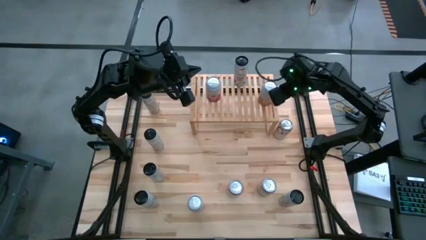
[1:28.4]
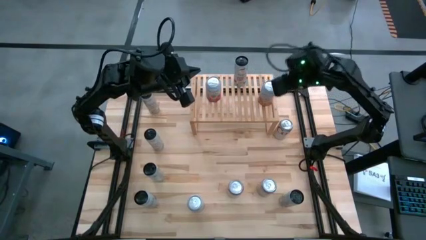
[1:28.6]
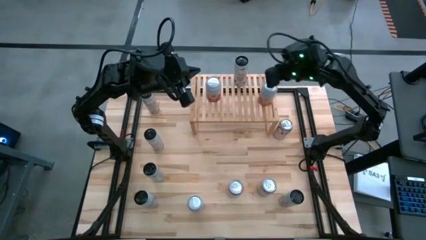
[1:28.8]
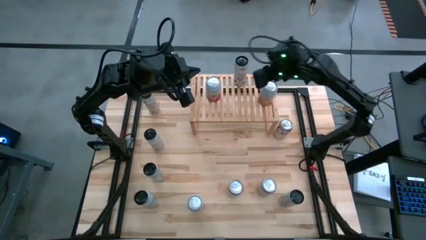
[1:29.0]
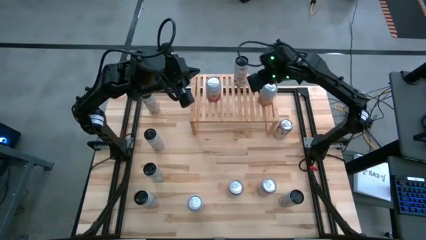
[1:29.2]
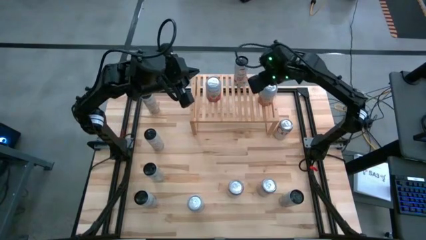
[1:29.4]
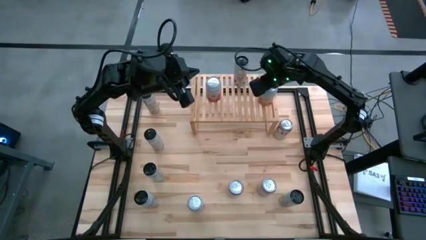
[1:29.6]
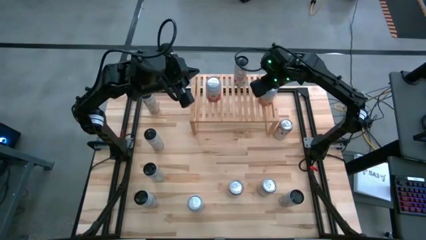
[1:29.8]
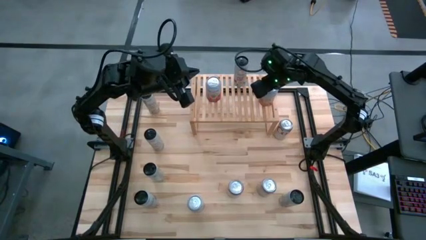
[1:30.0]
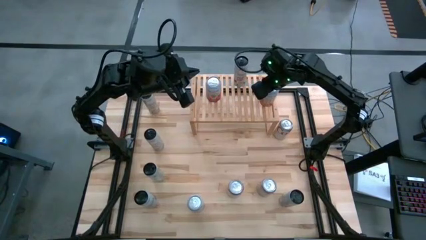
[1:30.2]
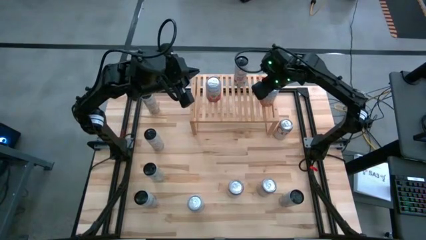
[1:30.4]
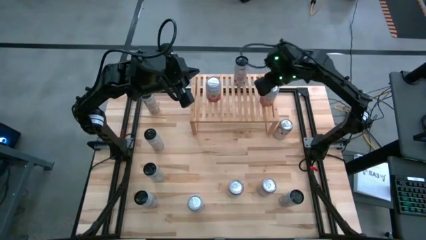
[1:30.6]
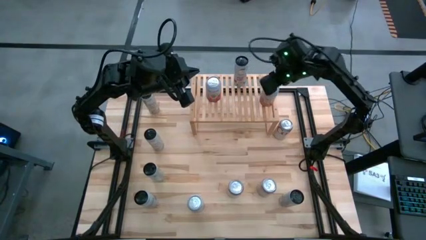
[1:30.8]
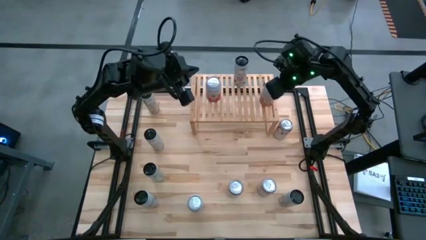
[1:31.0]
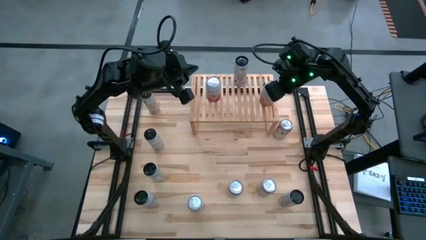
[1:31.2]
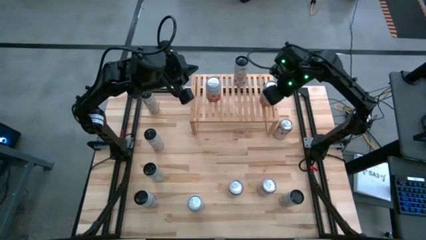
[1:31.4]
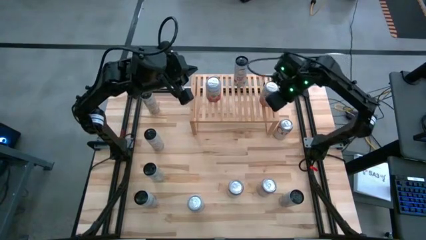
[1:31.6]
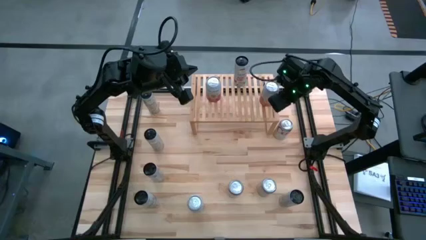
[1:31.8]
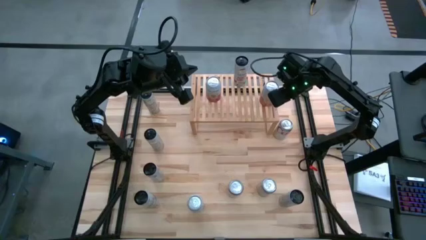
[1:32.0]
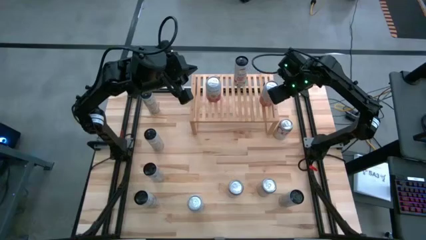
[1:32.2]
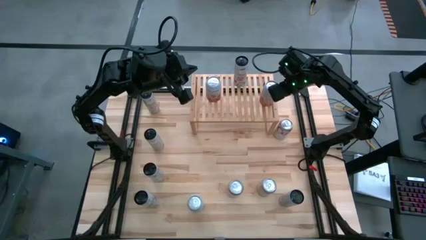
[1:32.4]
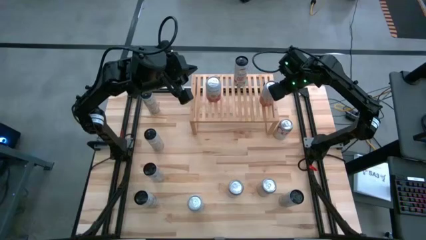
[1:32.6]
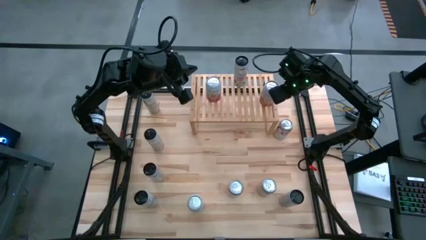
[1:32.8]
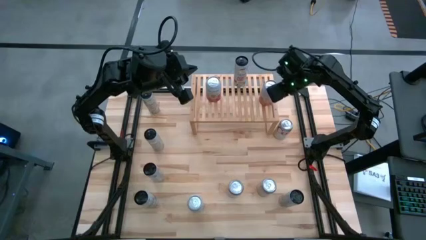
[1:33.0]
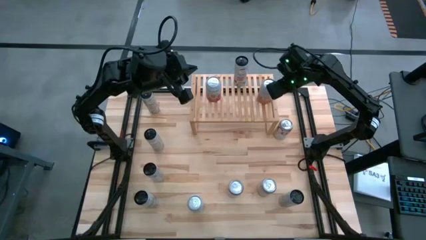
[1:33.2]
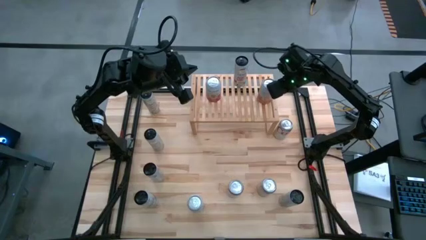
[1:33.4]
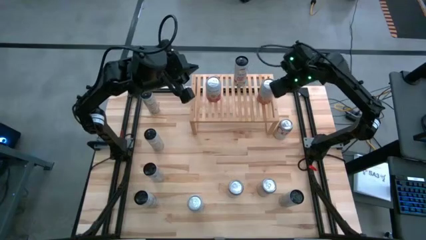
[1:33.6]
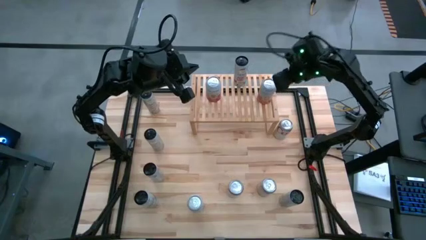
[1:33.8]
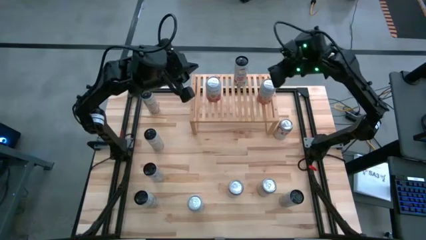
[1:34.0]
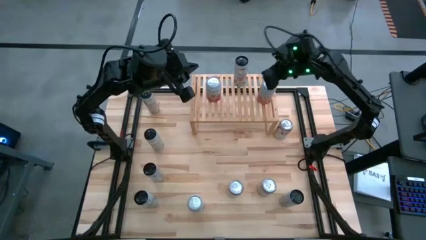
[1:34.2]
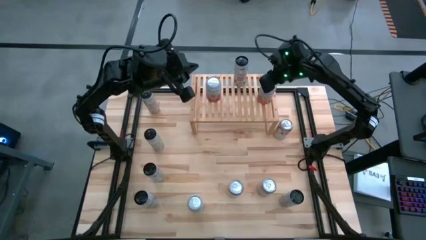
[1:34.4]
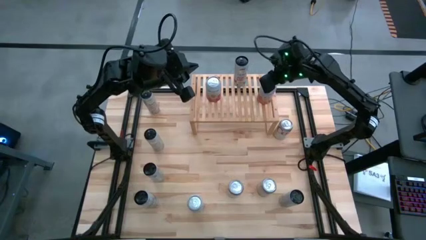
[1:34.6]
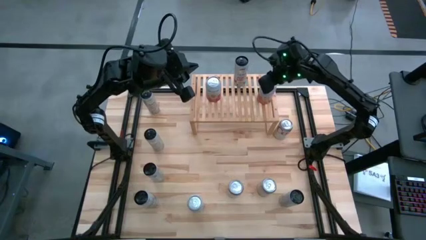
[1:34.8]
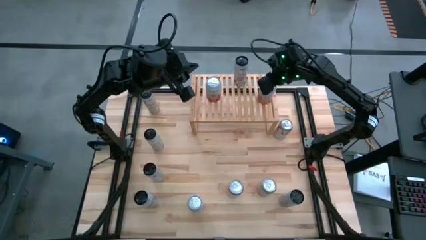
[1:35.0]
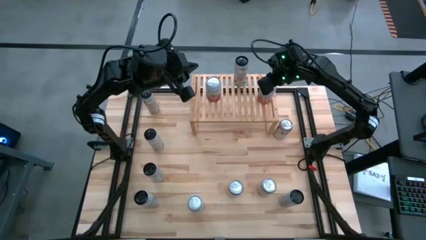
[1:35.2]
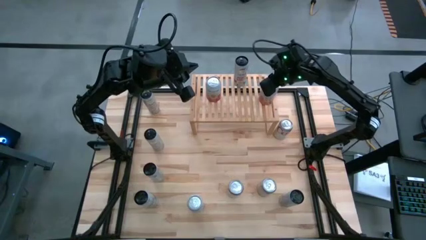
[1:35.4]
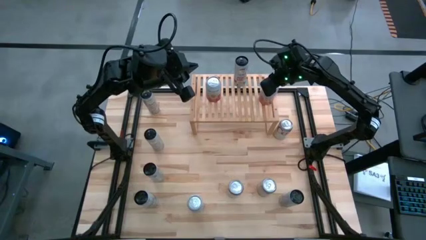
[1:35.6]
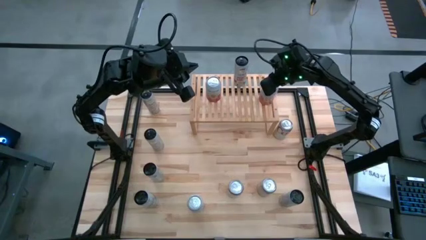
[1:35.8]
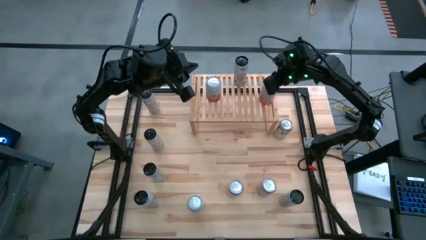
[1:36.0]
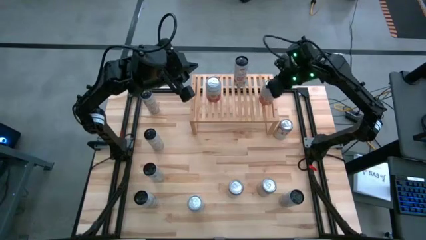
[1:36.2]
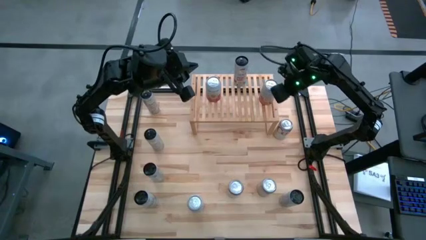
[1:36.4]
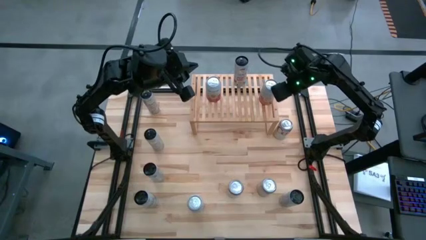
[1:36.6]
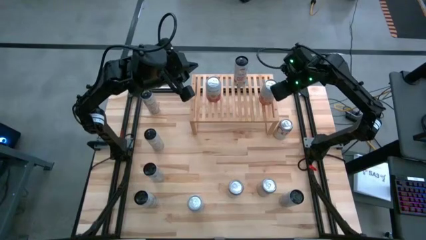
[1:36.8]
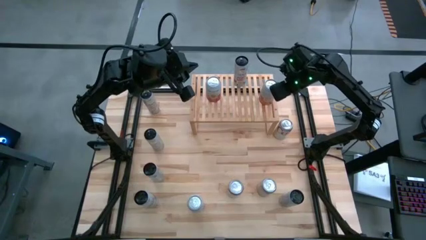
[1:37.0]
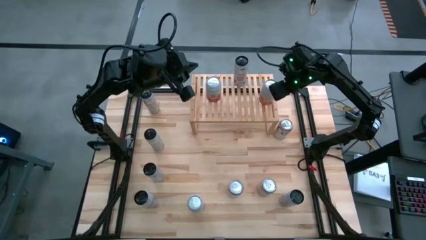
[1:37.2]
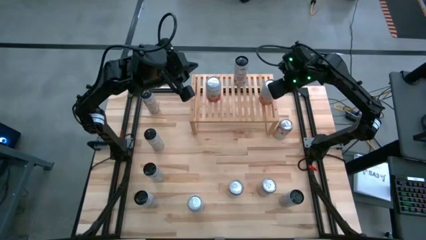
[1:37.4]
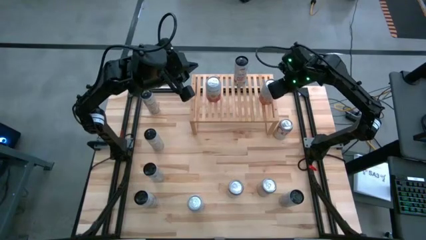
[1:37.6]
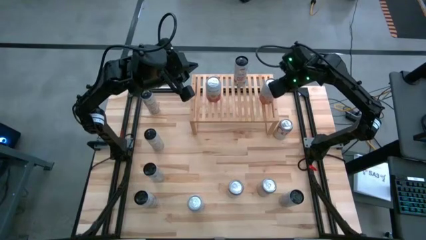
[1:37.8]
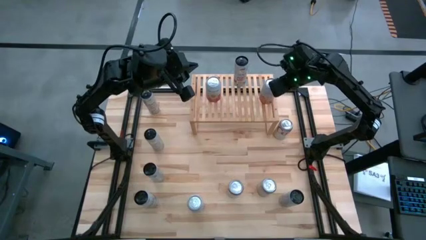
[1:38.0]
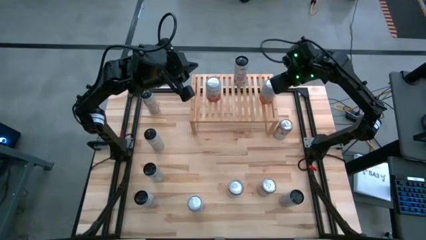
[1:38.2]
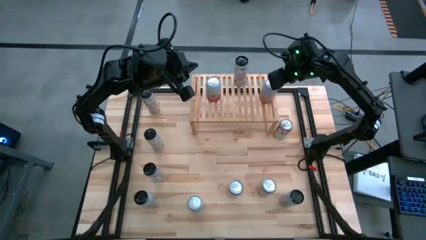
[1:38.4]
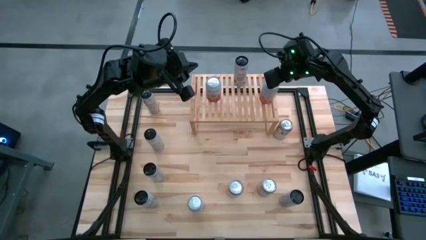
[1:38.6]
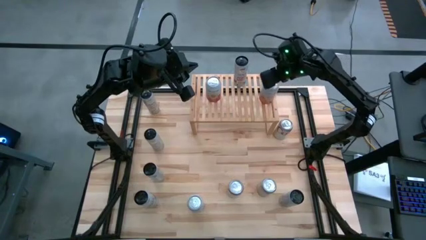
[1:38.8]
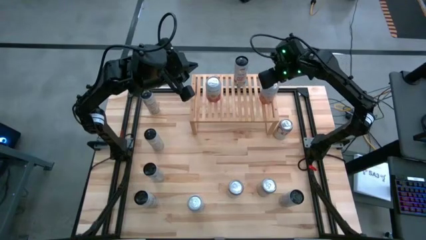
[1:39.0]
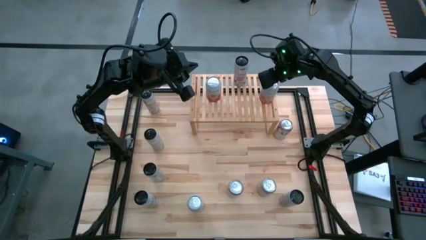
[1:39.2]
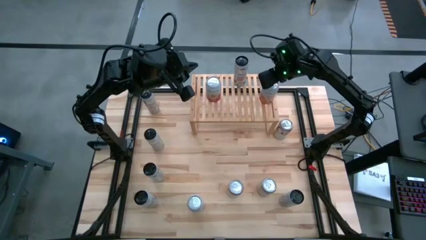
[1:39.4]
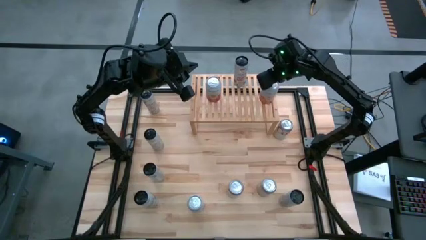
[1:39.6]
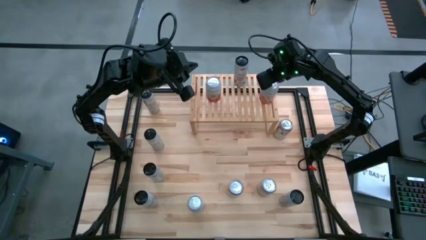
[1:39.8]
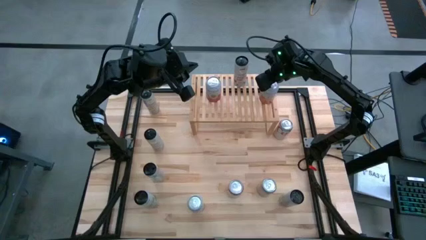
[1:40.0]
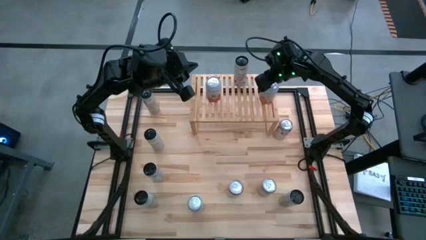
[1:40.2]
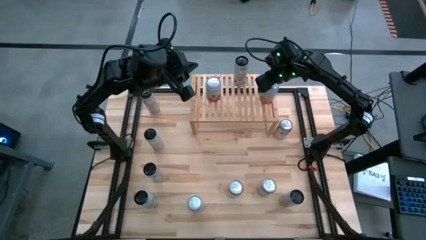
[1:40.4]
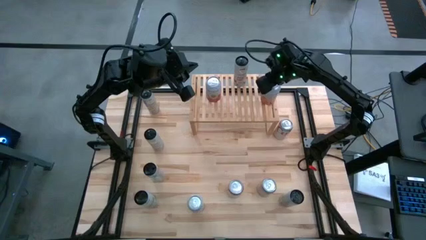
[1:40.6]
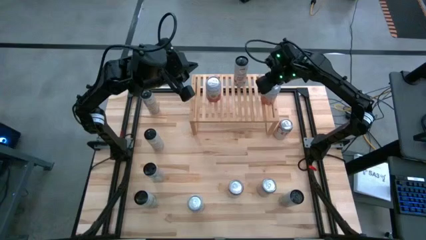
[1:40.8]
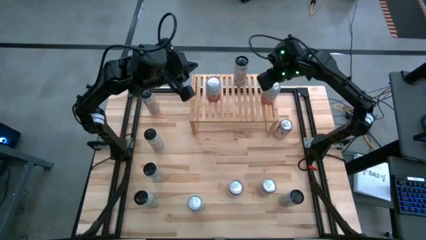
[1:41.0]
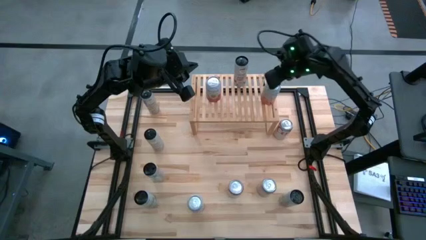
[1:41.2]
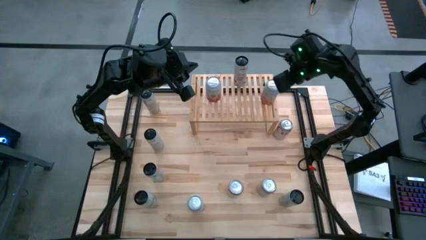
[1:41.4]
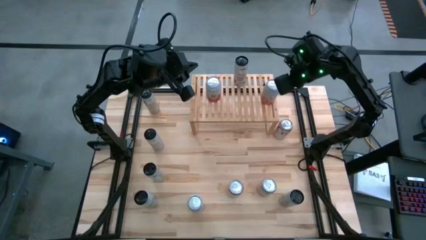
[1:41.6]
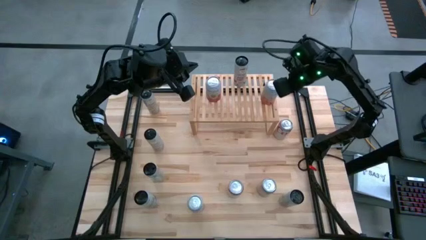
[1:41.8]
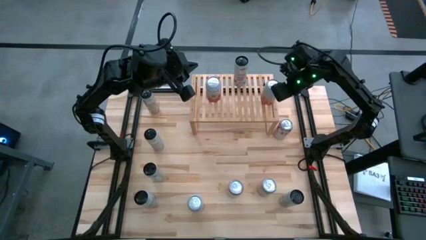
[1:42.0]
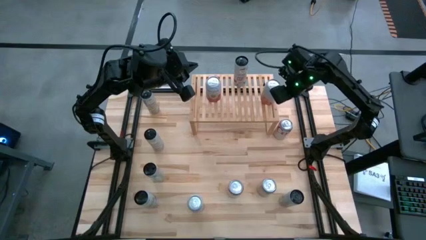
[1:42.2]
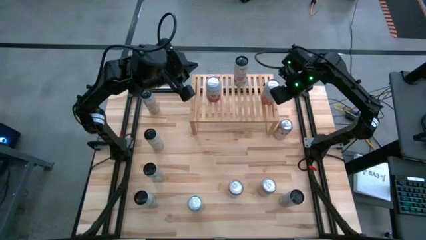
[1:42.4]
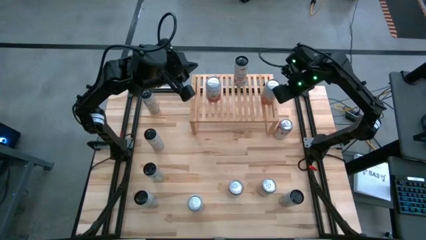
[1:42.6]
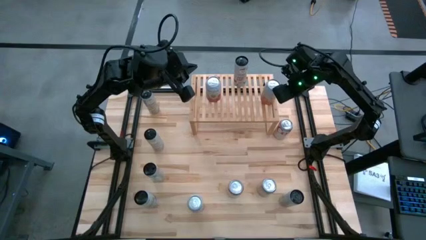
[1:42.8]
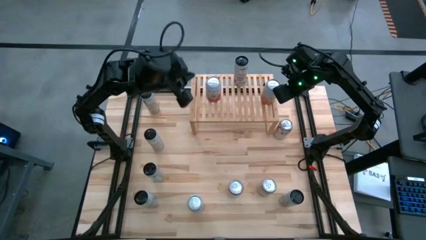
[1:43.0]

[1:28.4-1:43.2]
Task: Place canned beverage on shelf
Put the orange and white soda can on the shelf

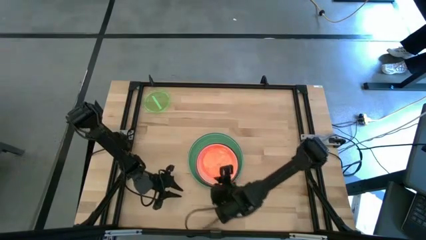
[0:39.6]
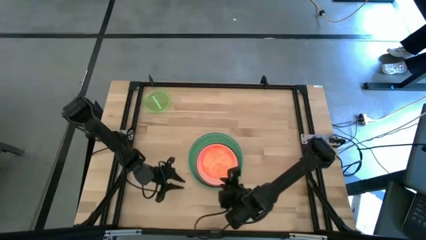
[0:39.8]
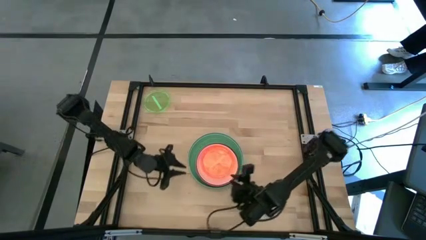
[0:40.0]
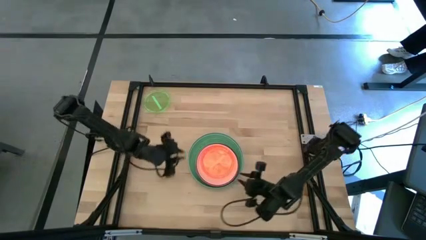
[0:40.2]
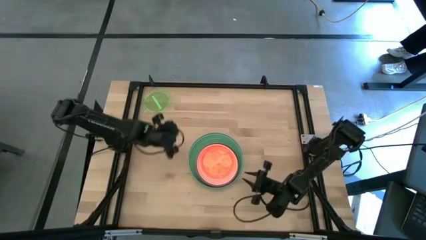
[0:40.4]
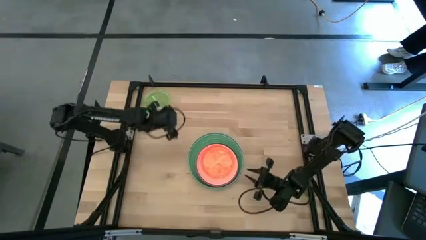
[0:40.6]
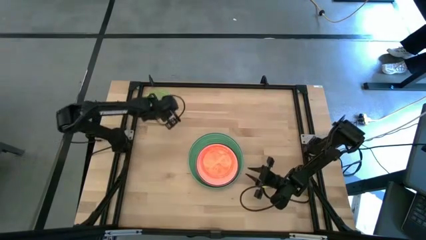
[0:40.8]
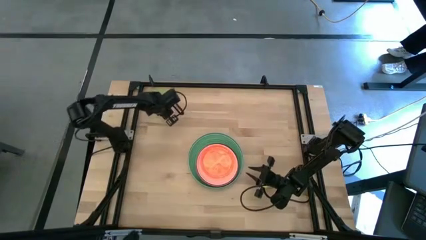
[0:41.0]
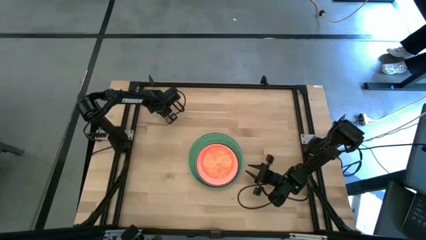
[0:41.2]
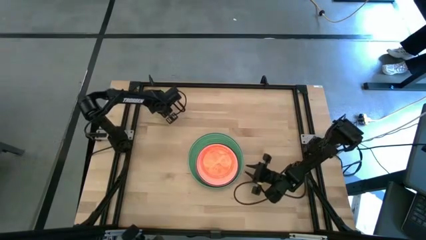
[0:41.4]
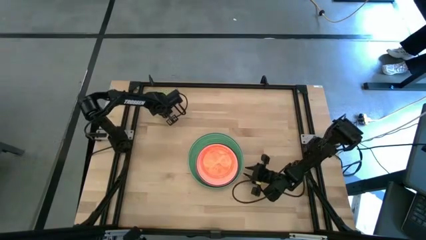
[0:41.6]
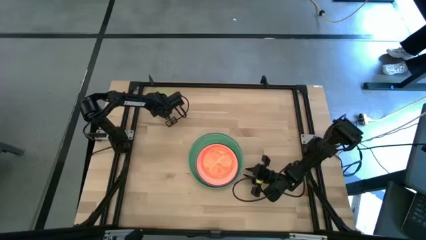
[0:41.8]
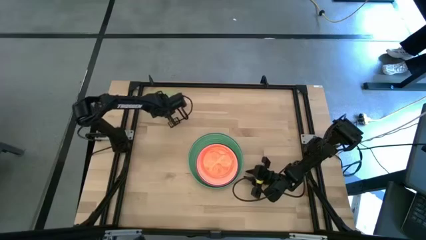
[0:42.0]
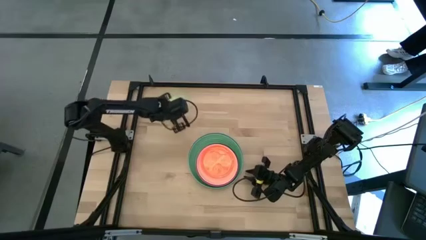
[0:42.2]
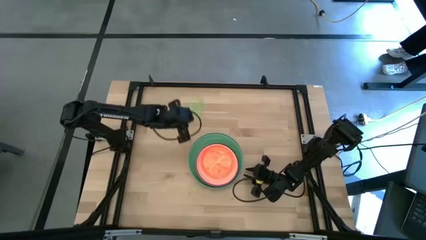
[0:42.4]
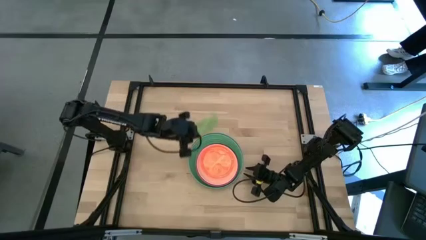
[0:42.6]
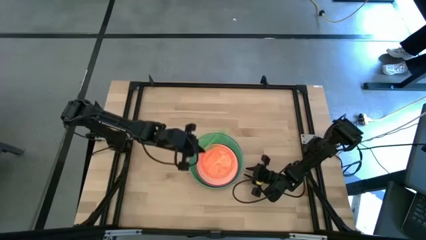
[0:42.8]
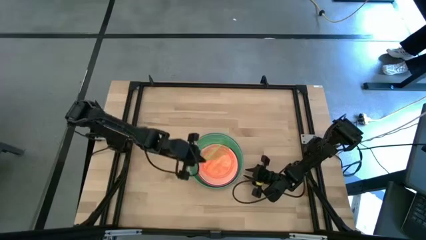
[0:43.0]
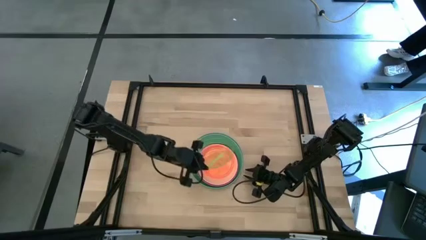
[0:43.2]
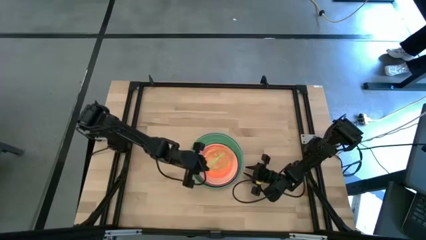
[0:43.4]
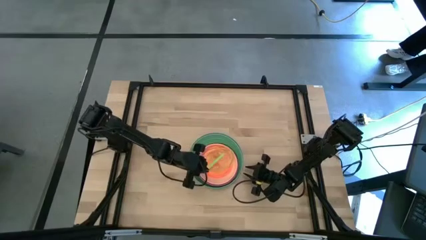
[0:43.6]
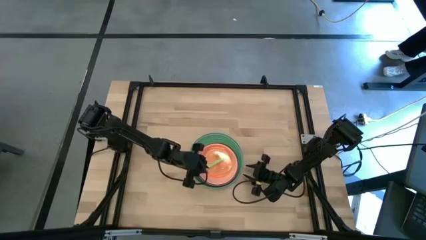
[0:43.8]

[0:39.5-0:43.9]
Task: Stack plastic plates
Stack the small green plate on top of the small orange plate
